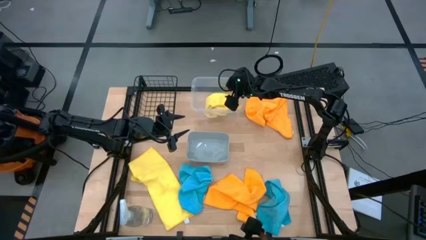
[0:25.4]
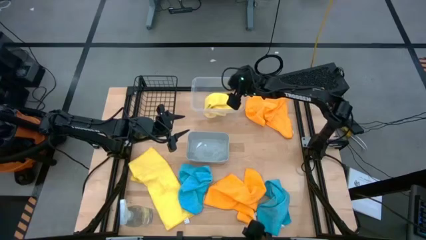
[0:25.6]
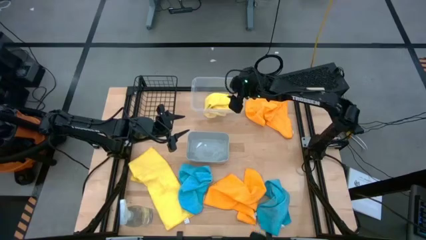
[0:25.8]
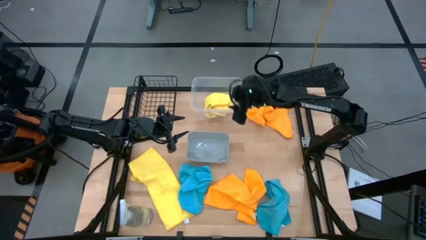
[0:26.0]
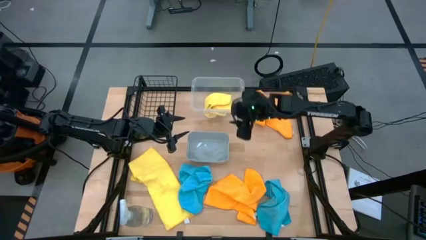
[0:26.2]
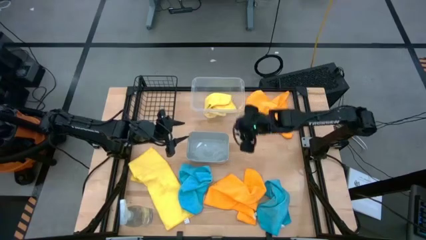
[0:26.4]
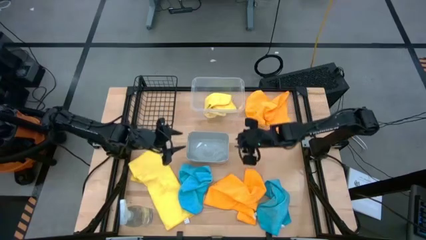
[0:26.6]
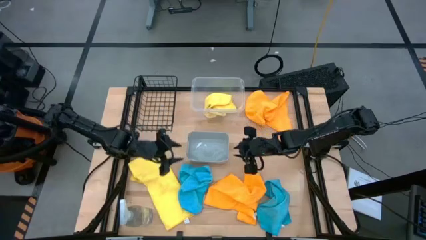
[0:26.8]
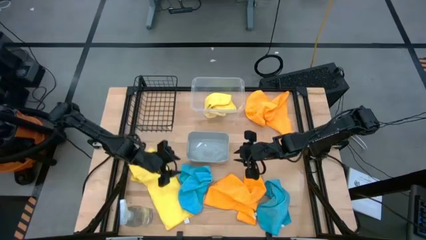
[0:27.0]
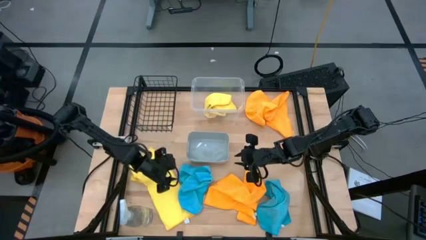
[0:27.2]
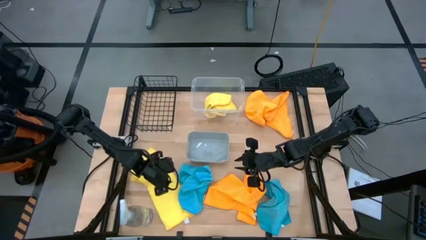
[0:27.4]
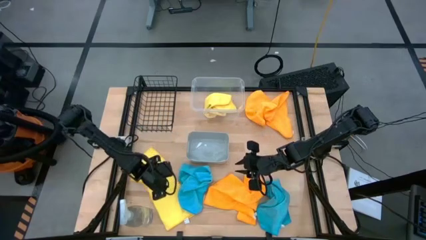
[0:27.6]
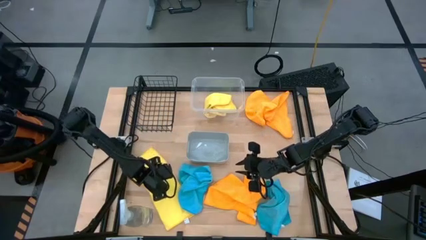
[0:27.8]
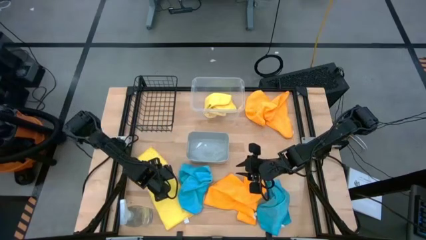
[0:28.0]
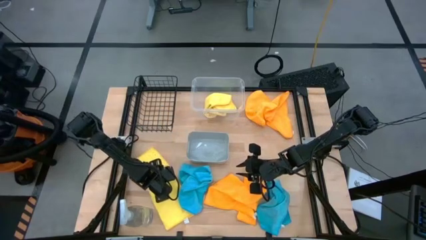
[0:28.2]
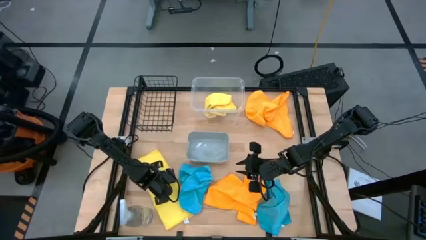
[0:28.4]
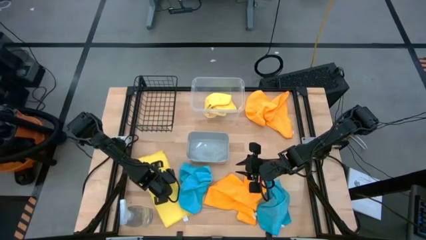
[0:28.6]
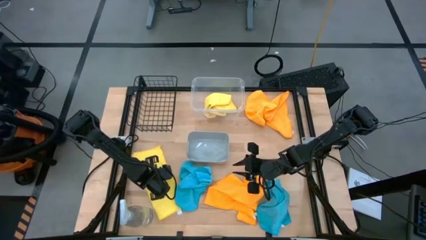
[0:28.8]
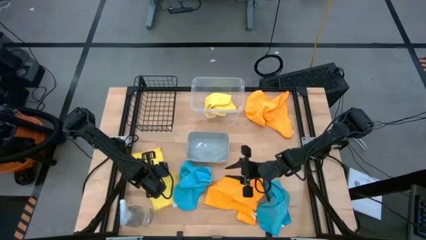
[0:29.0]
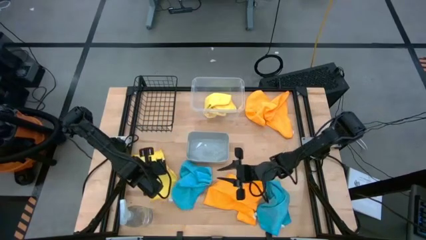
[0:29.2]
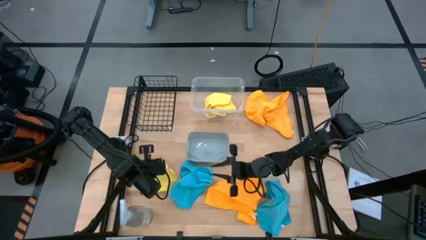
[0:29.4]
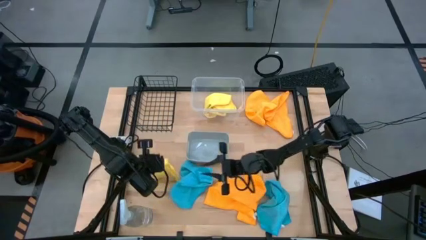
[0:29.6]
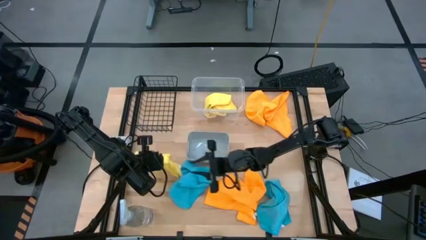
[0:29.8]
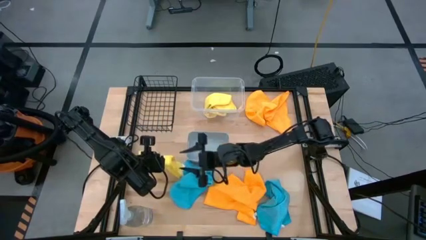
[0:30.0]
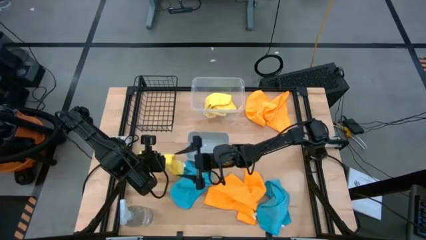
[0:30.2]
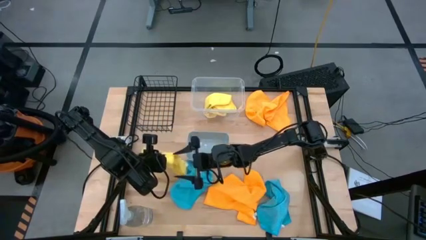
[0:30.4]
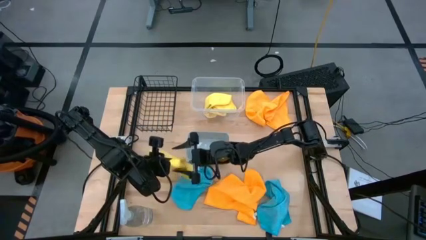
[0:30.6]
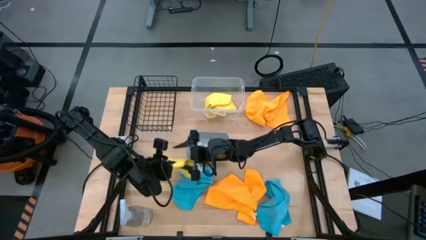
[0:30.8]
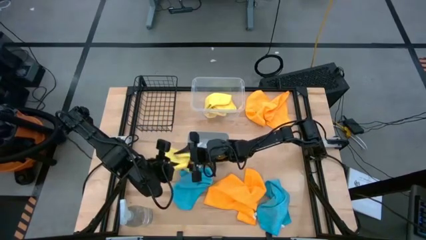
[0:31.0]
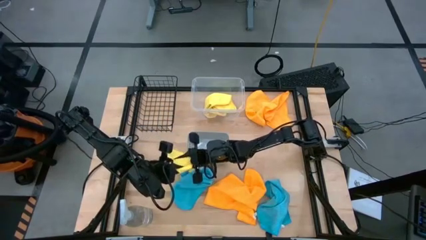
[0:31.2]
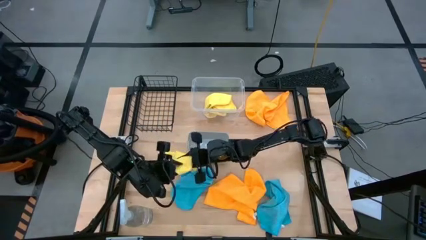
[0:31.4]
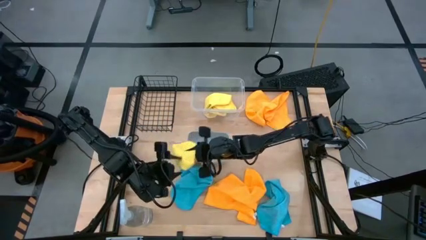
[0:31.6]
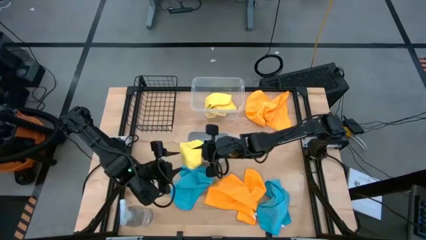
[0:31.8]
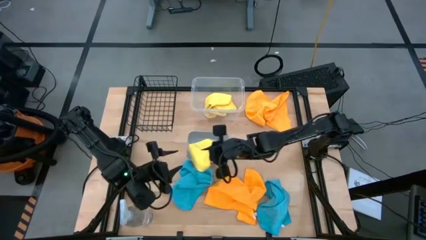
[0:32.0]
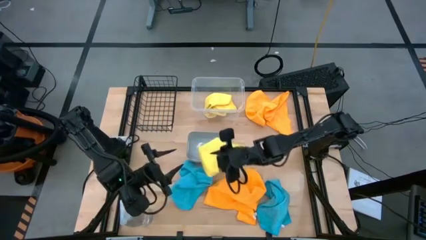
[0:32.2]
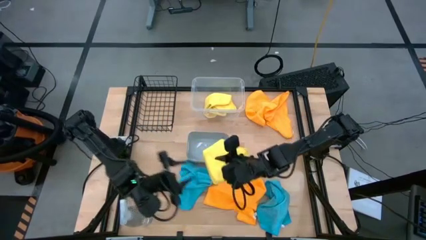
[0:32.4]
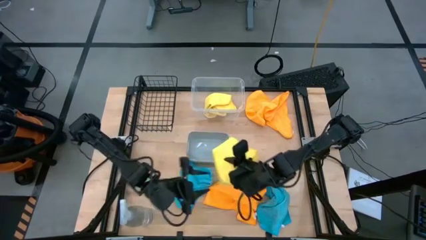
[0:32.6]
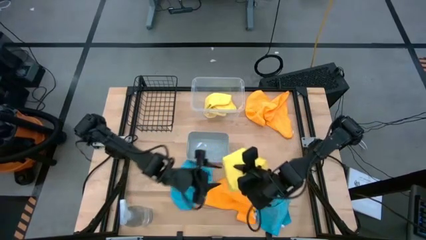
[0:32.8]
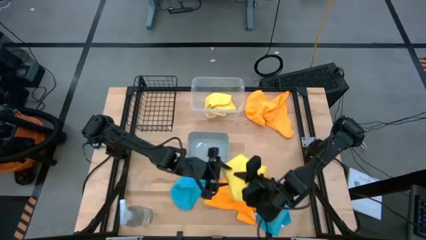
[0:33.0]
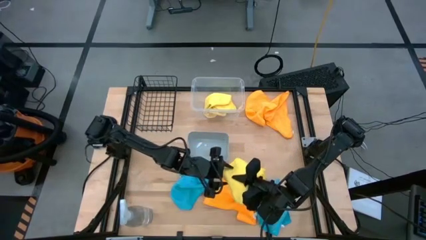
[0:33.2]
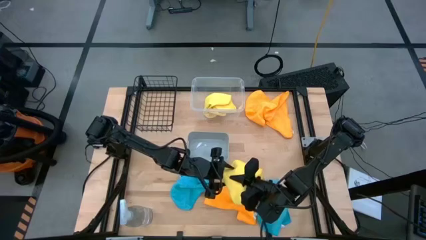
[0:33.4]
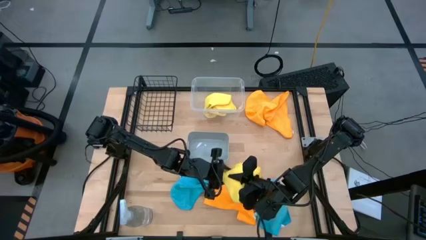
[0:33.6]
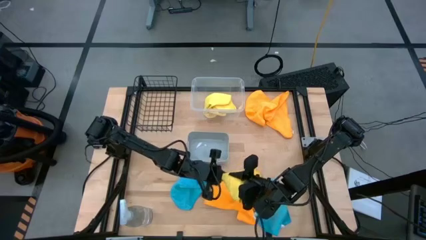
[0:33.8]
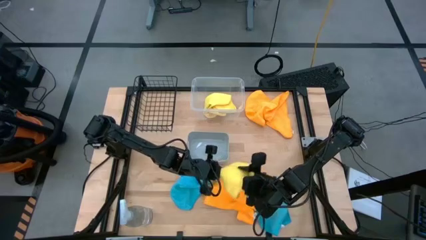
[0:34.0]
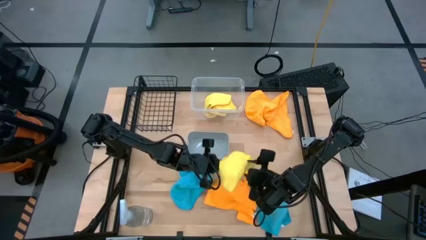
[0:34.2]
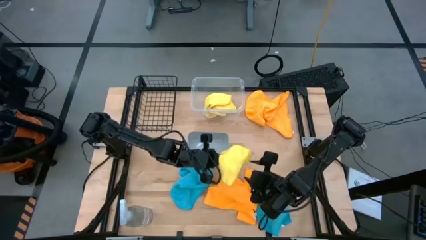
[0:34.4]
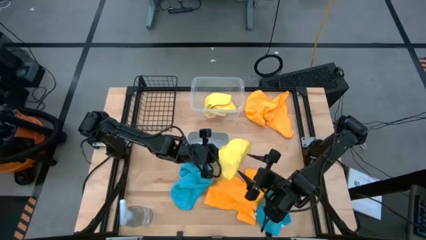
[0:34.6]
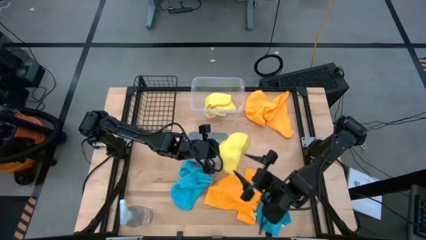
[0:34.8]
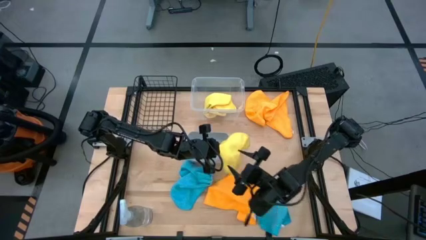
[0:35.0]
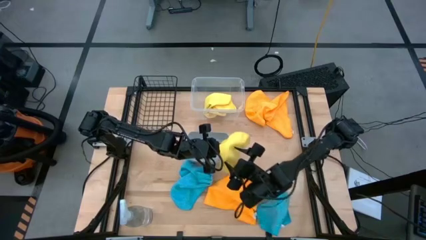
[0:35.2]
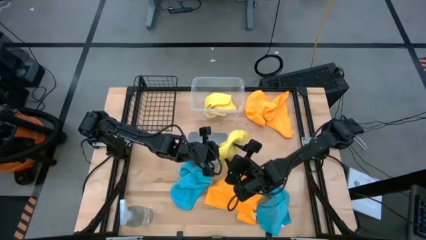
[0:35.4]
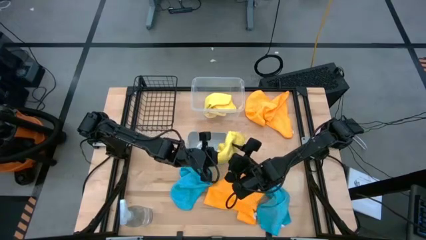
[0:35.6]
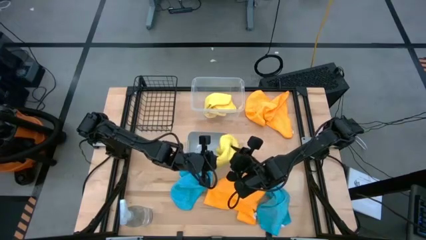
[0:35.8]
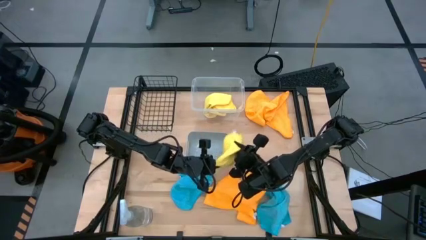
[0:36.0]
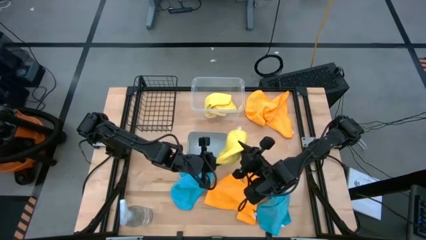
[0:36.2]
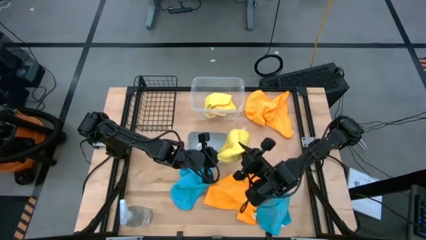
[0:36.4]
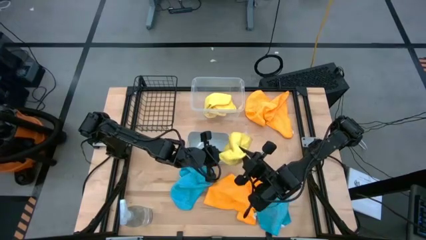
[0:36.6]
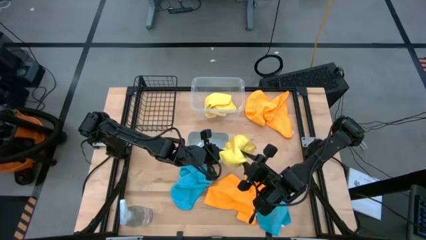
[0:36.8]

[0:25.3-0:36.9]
Task: Sort microfiber towel by color & place in baskets
Put the yellow microfiber cloth into the transparent bin
